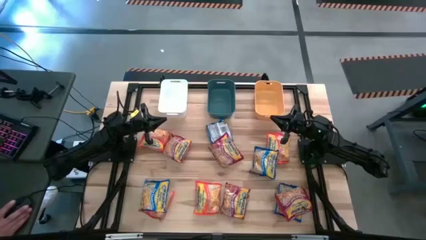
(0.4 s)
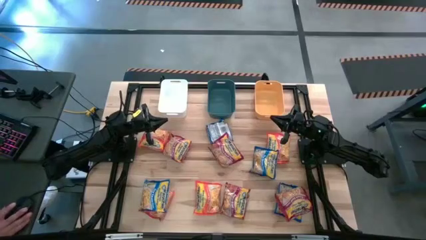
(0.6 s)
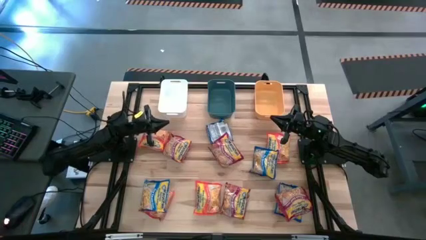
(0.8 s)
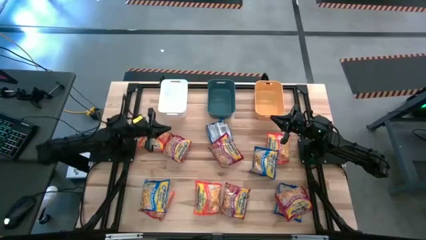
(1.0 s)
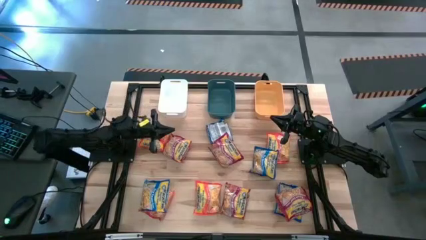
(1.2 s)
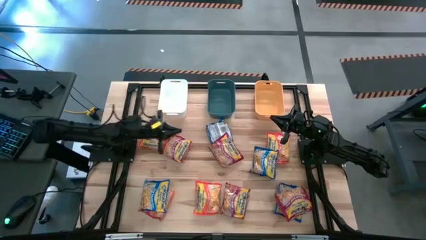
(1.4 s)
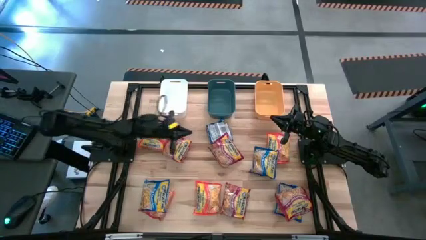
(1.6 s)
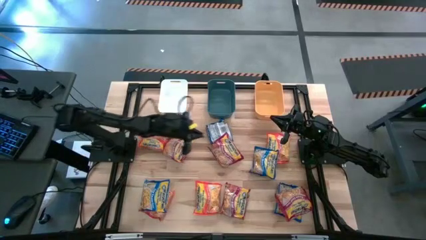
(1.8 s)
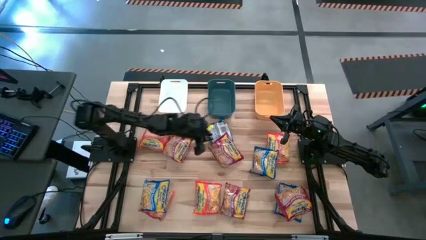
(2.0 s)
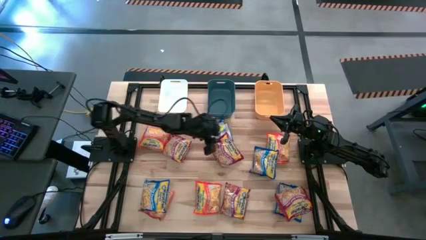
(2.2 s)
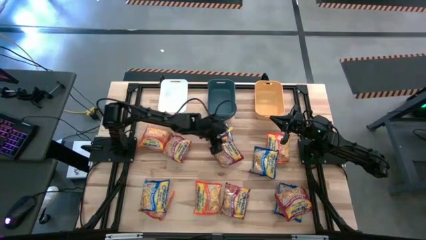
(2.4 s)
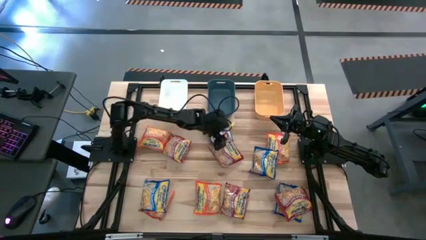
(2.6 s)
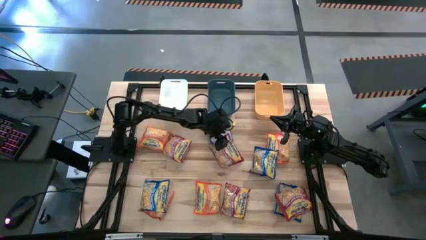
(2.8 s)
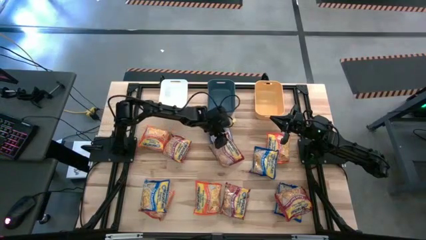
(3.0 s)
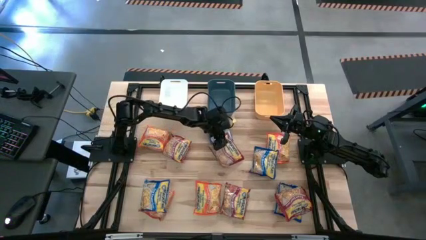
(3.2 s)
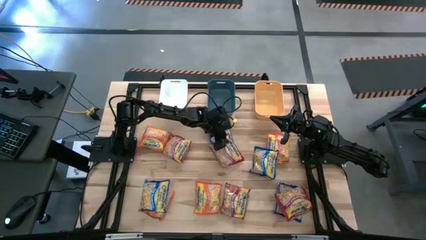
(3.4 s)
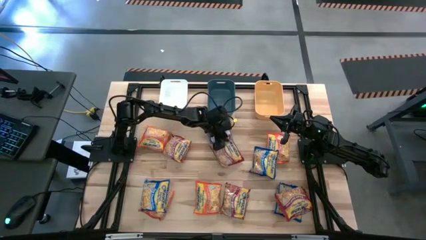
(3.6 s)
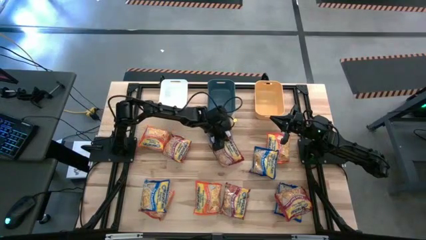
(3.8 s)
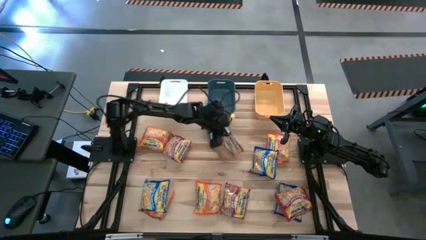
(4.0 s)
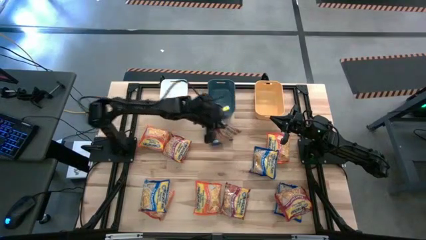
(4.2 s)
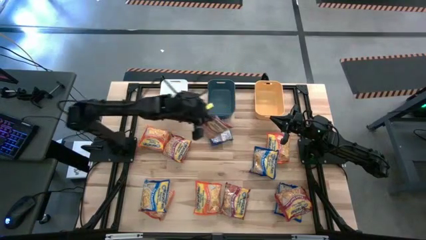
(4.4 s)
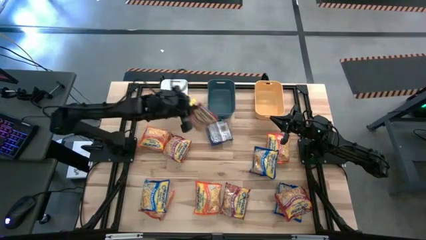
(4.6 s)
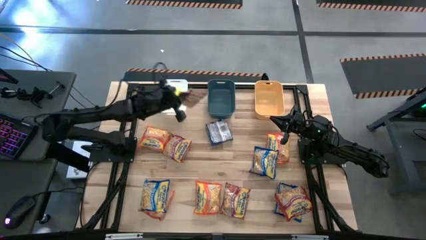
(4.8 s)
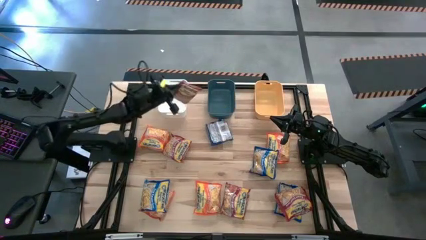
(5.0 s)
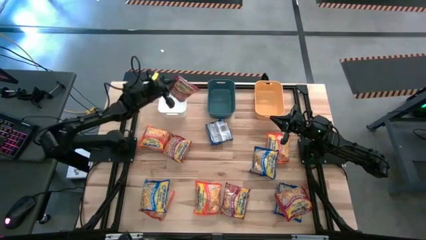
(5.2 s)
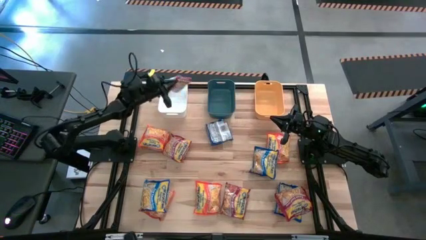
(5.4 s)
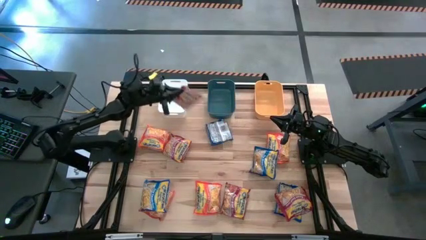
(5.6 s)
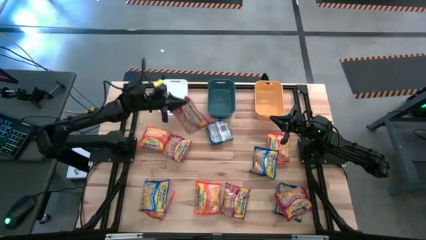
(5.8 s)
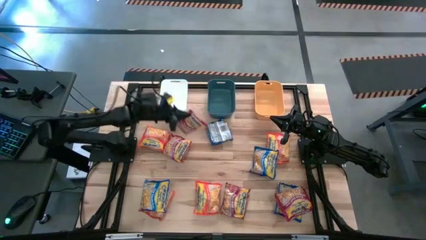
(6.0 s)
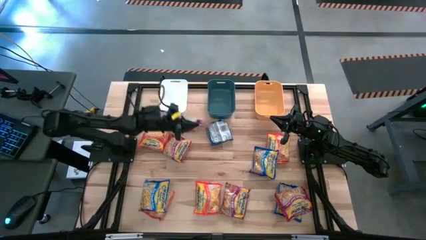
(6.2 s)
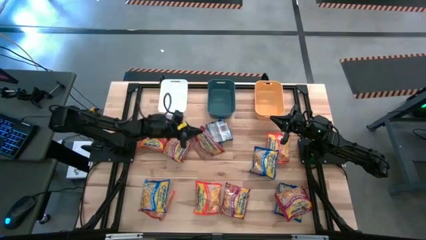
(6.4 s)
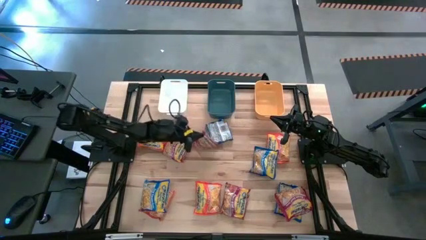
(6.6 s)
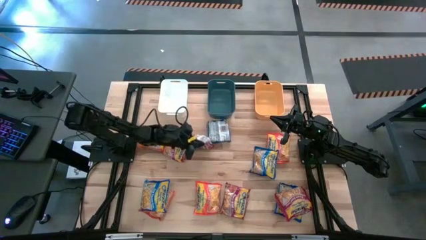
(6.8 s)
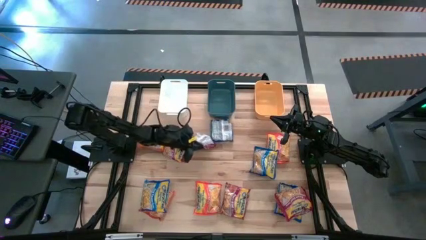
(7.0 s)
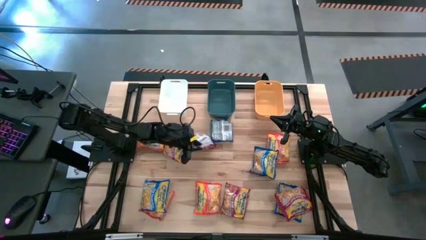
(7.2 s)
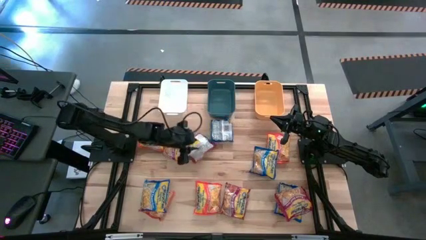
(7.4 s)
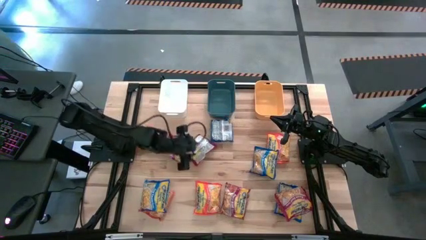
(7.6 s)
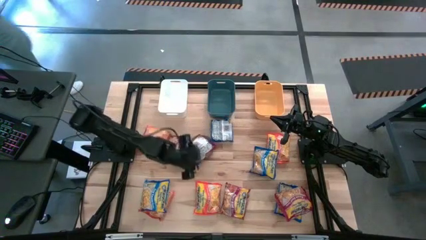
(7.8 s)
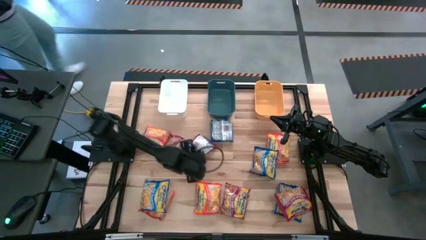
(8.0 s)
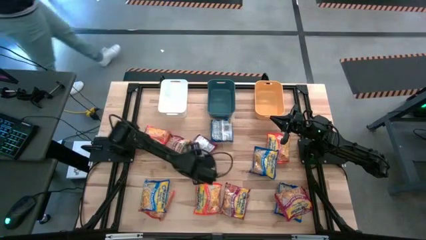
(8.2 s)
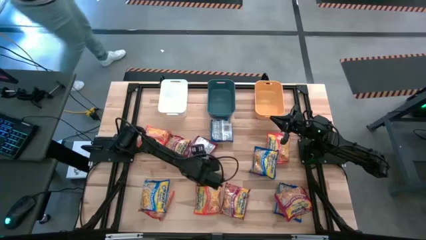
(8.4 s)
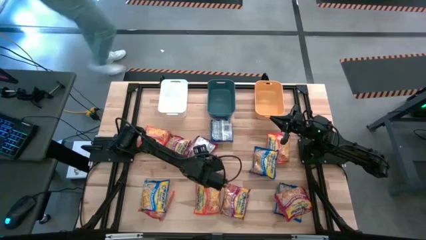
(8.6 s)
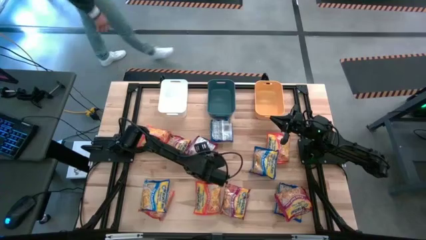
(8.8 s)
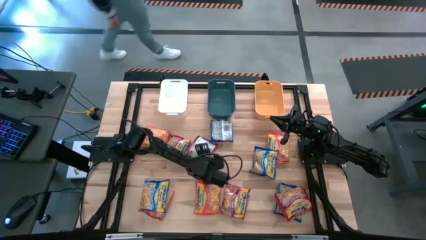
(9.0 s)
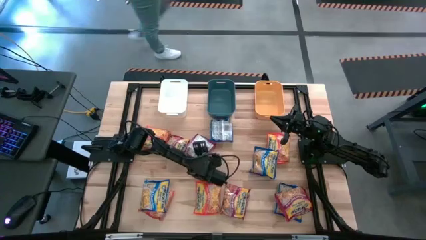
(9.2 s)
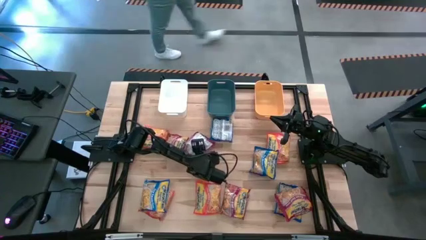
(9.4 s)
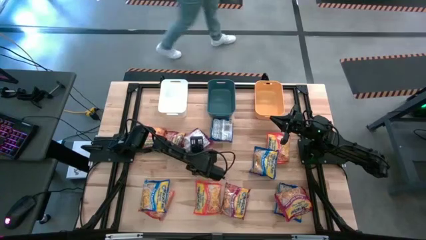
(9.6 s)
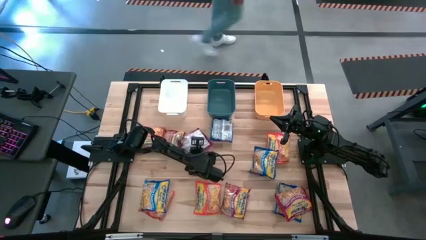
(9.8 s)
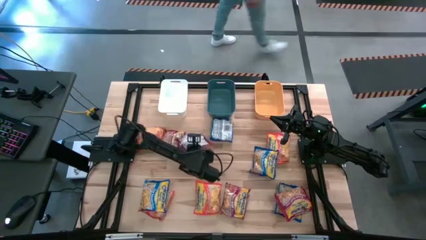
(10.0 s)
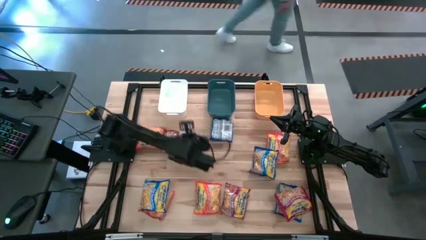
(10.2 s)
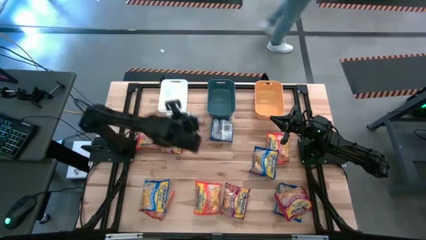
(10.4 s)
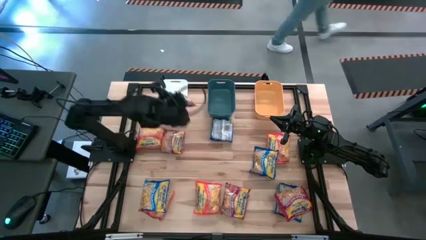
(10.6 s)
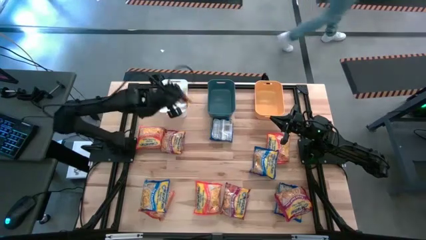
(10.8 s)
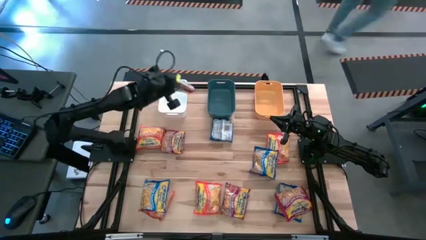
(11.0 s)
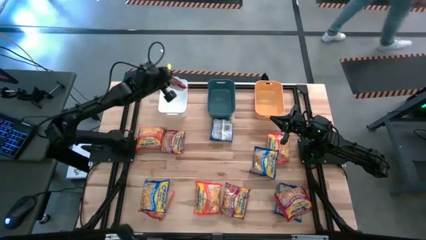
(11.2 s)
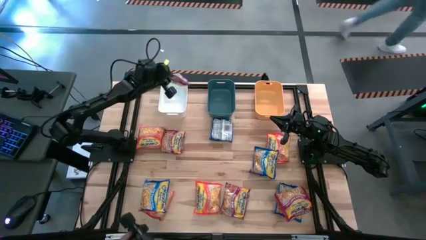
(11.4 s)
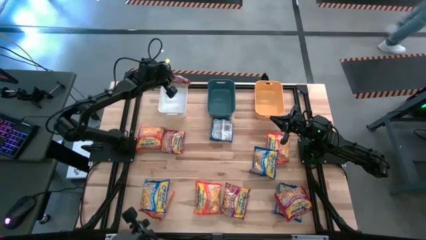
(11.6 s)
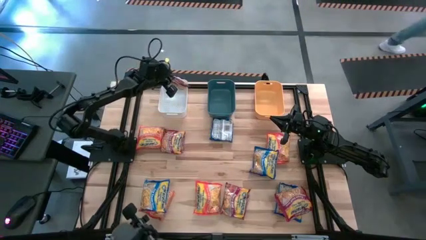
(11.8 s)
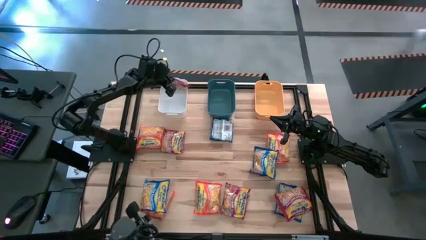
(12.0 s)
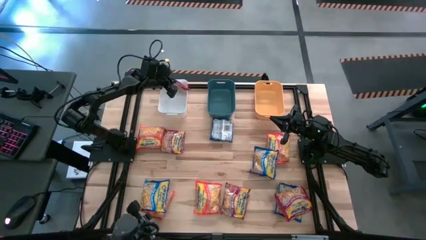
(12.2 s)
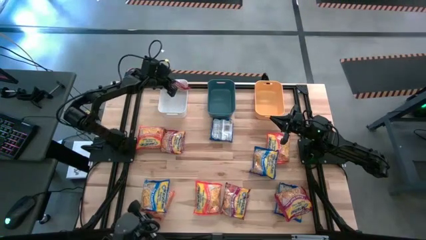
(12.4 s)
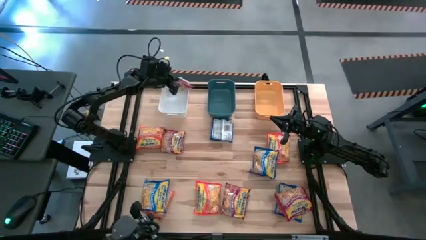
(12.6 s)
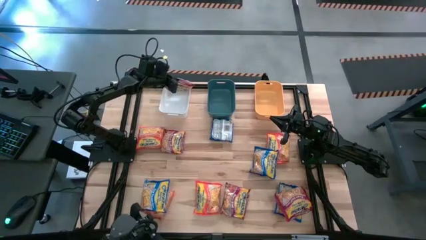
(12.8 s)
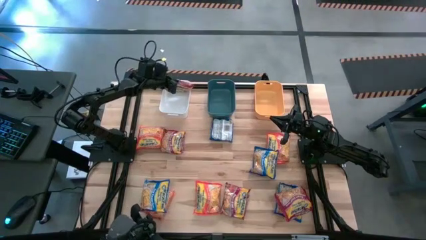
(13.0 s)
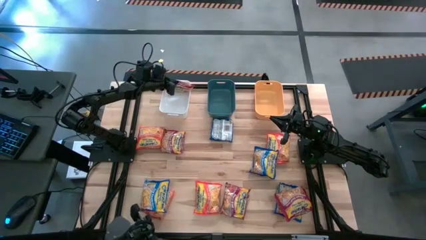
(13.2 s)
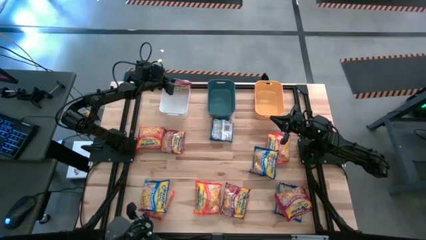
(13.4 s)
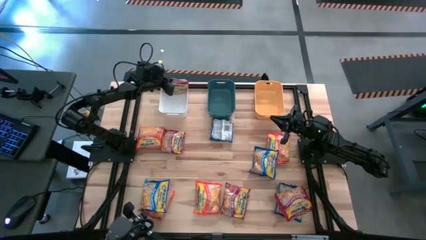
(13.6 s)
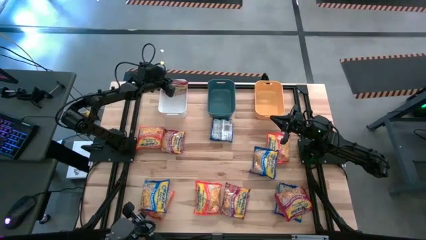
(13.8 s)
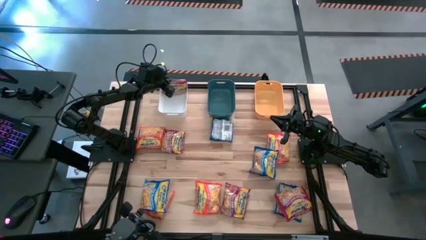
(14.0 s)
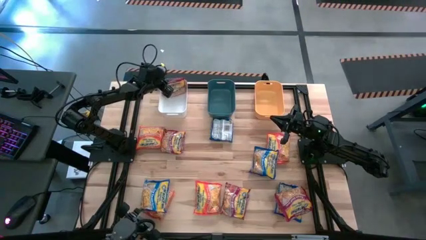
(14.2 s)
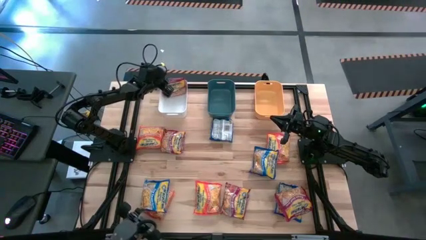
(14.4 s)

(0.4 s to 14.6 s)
Task: Sort Maruchan noodles
Put the red noodle pack into the white bin
